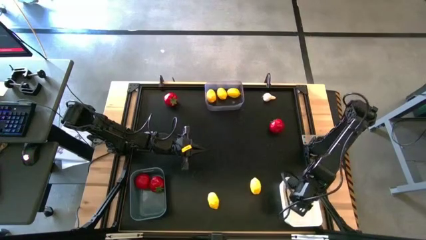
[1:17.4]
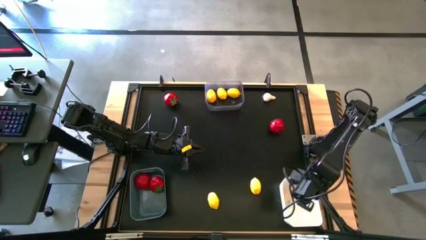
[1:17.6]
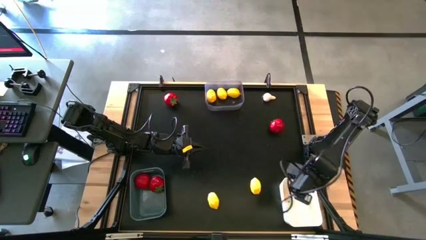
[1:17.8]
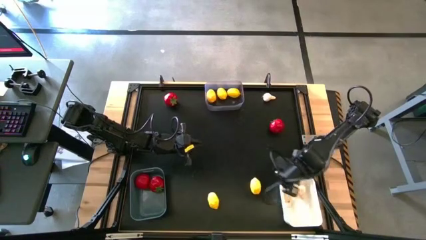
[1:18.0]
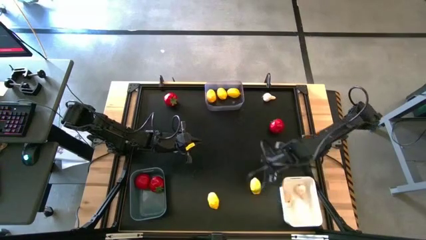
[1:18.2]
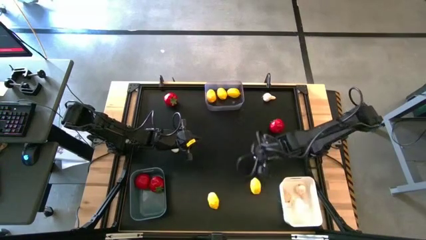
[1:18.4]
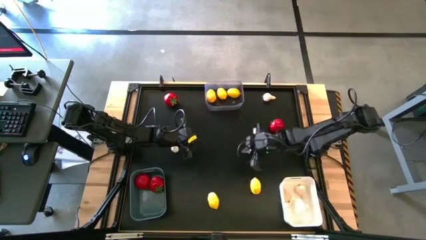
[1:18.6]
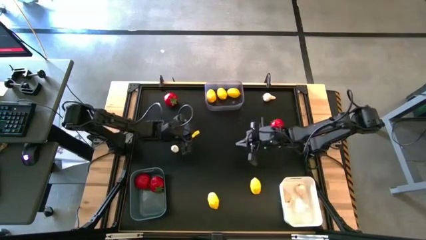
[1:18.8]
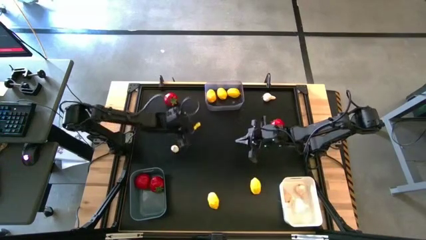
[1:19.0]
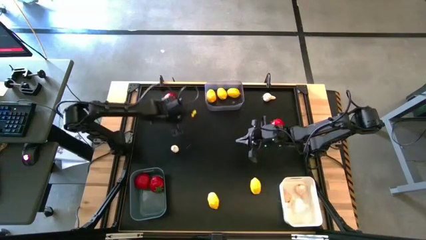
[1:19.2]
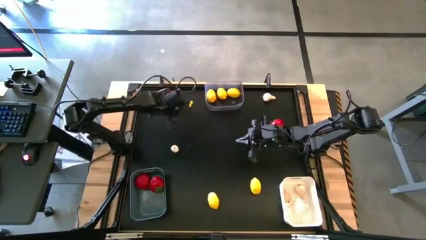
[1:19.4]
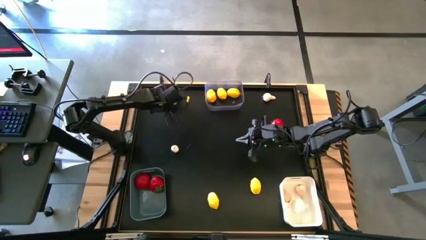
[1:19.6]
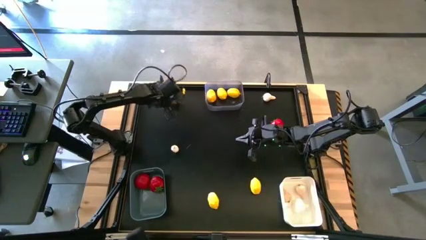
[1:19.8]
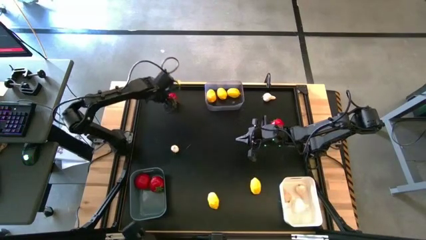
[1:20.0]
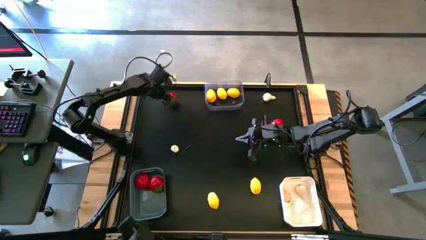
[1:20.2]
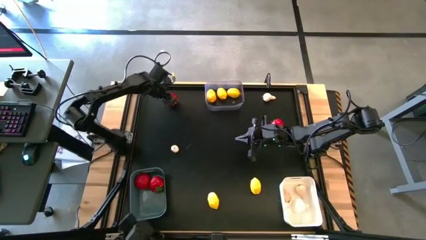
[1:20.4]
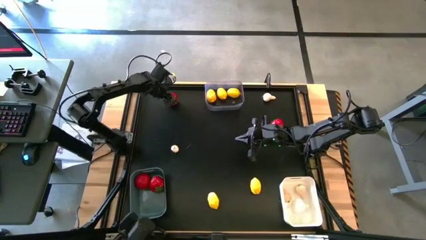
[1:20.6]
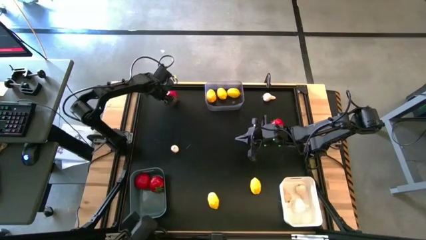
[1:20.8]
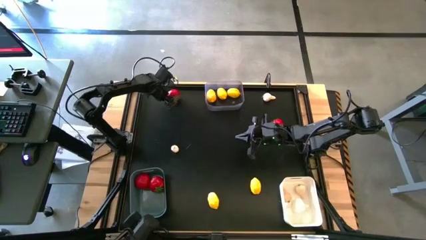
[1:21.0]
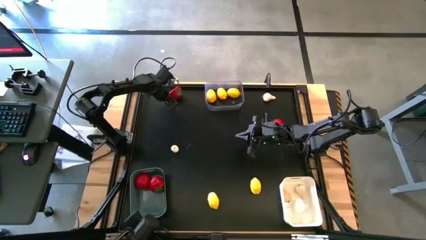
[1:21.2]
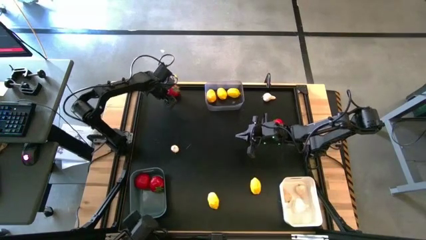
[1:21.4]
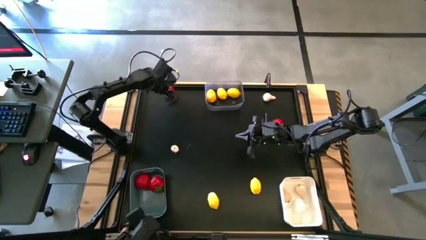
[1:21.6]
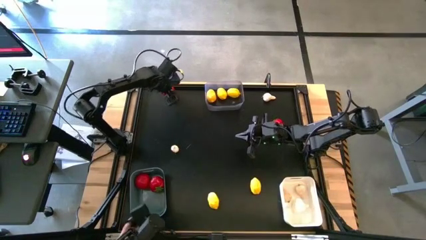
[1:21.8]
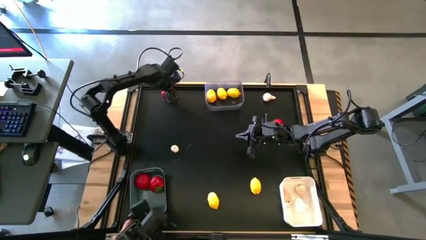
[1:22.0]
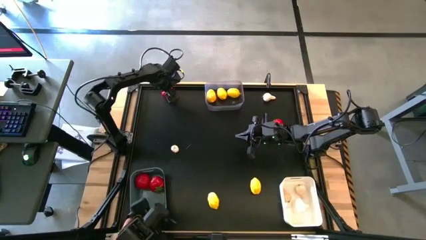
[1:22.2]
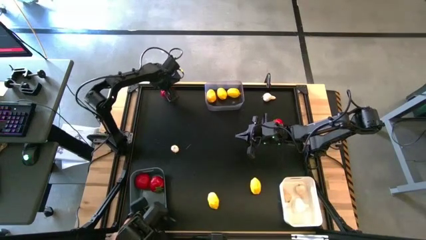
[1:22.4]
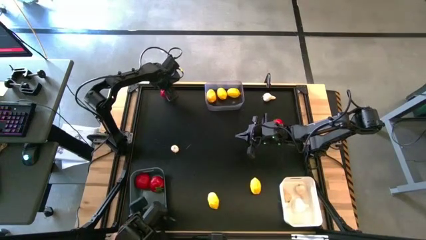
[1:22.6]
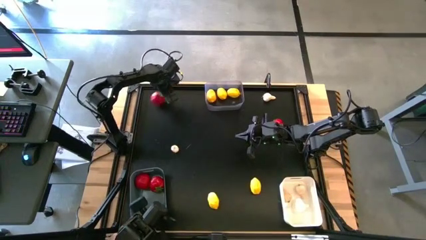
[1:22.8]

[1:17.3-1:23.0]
Task: Sort produce into baskets
Put the left tomato into the dark green bin

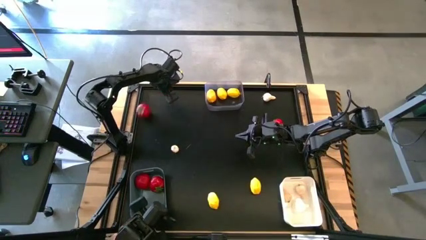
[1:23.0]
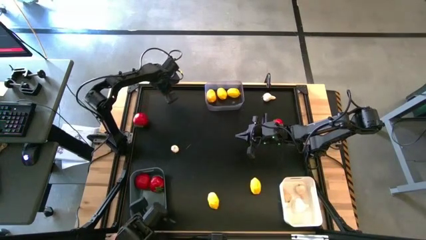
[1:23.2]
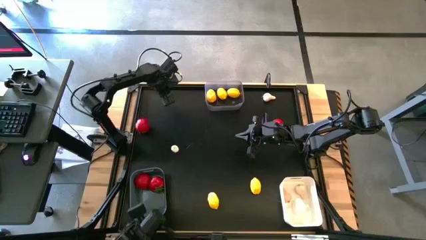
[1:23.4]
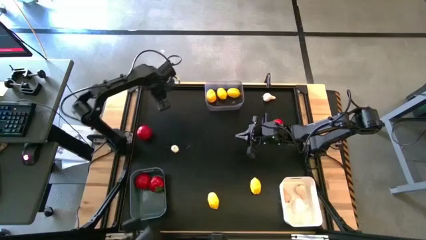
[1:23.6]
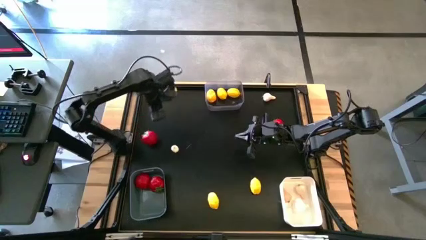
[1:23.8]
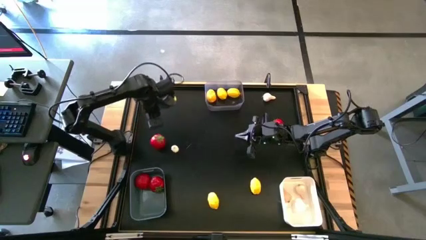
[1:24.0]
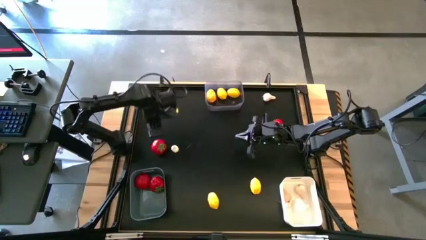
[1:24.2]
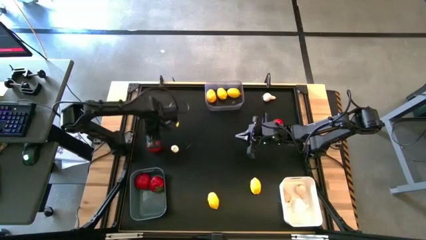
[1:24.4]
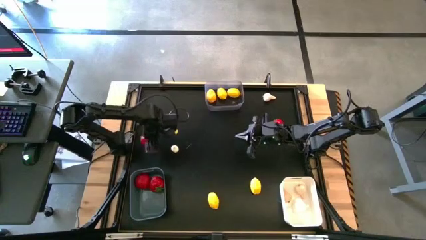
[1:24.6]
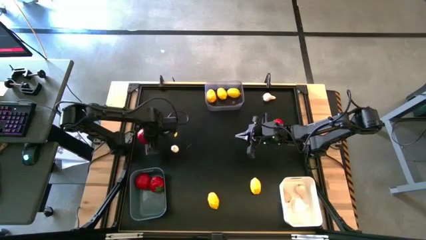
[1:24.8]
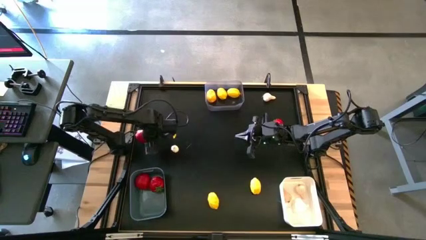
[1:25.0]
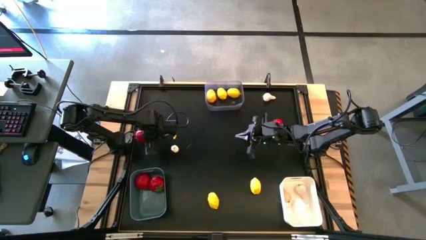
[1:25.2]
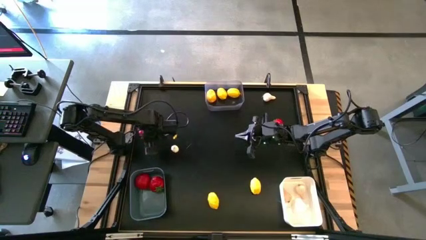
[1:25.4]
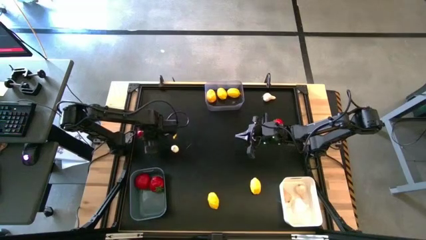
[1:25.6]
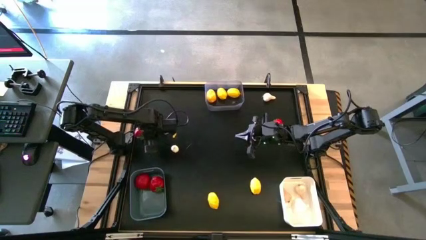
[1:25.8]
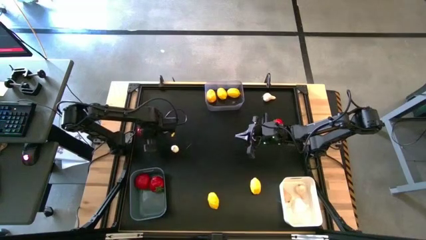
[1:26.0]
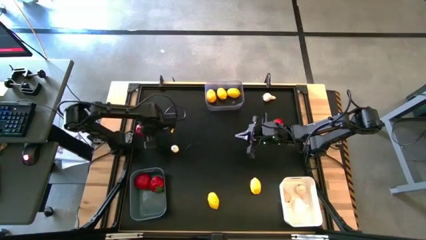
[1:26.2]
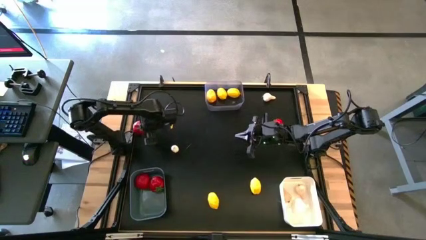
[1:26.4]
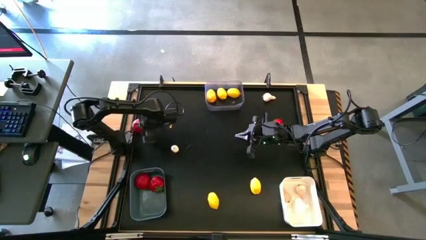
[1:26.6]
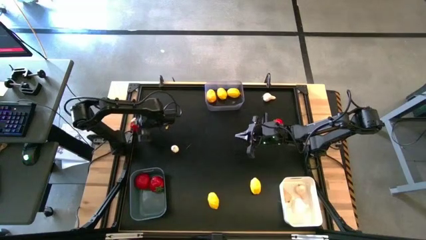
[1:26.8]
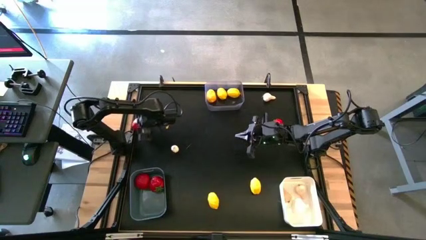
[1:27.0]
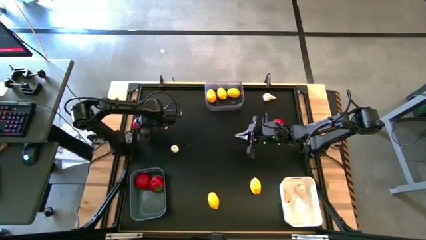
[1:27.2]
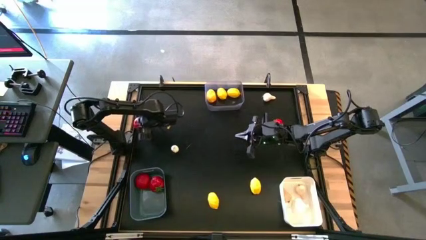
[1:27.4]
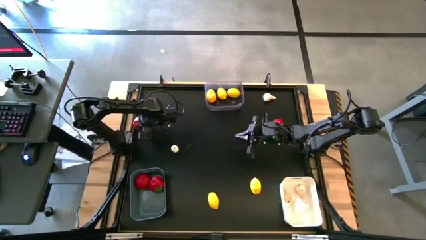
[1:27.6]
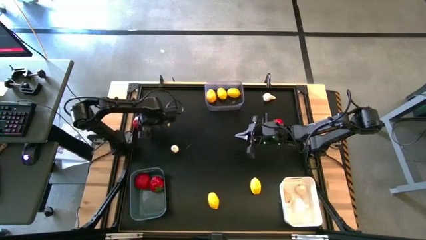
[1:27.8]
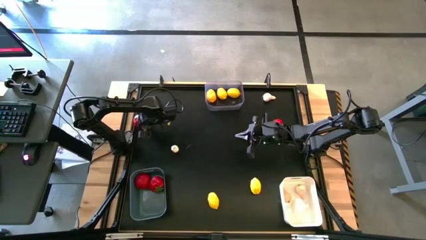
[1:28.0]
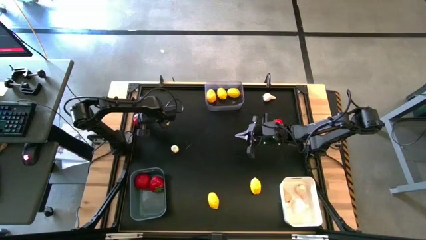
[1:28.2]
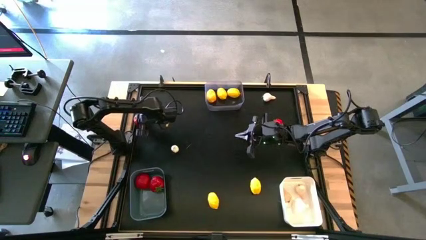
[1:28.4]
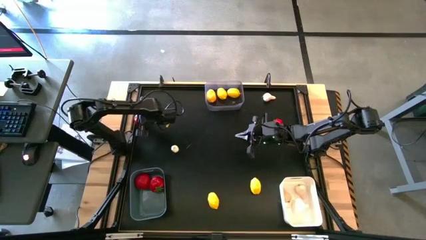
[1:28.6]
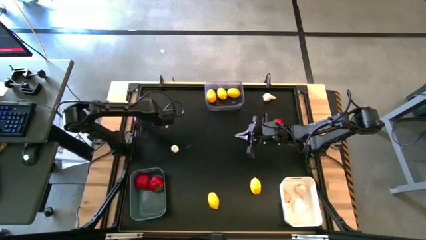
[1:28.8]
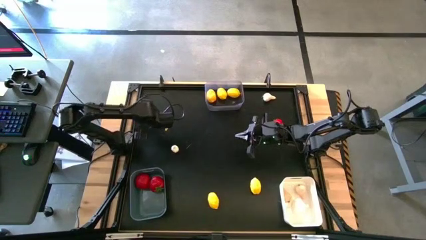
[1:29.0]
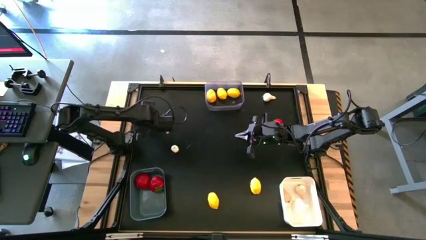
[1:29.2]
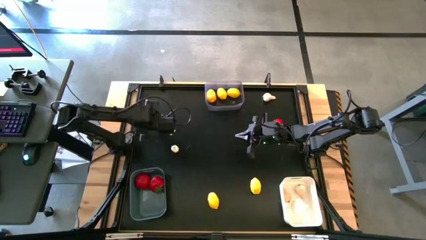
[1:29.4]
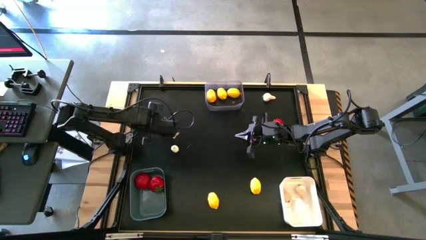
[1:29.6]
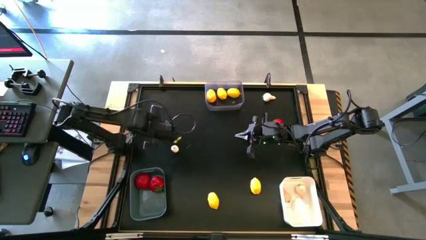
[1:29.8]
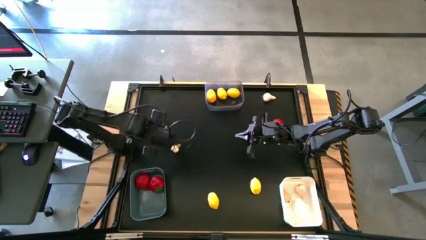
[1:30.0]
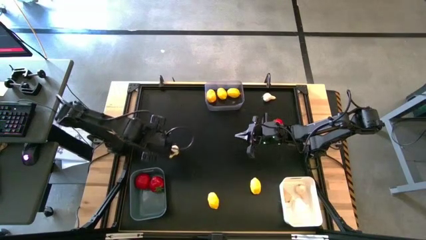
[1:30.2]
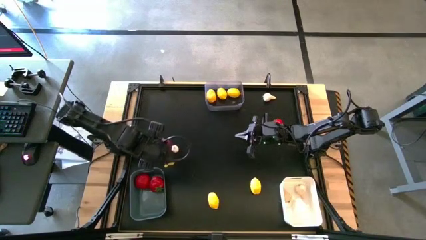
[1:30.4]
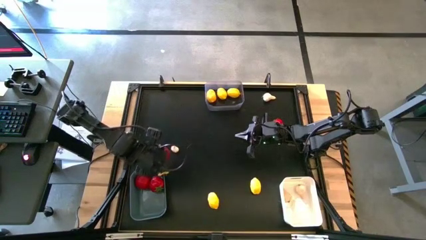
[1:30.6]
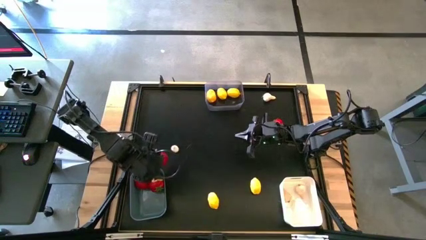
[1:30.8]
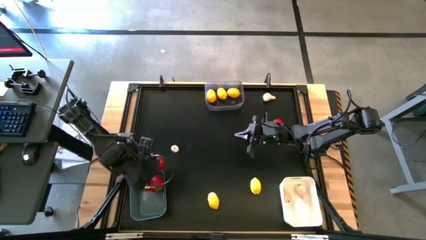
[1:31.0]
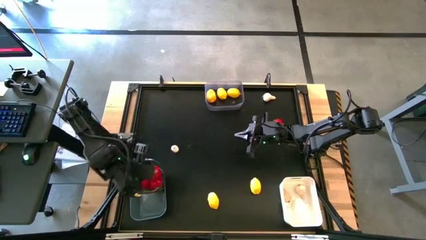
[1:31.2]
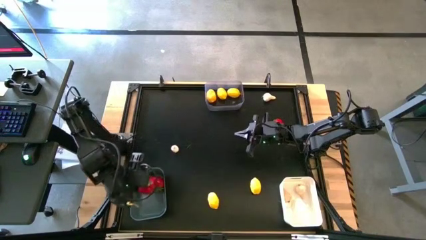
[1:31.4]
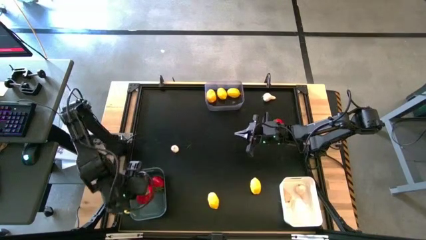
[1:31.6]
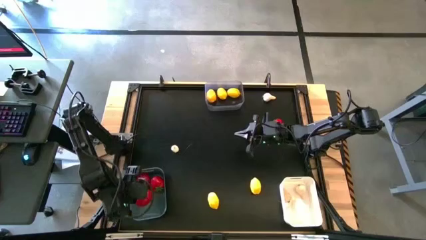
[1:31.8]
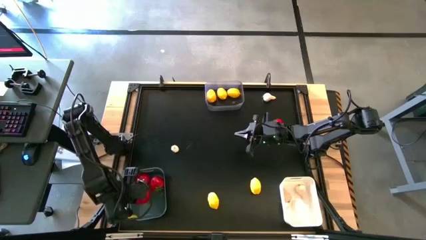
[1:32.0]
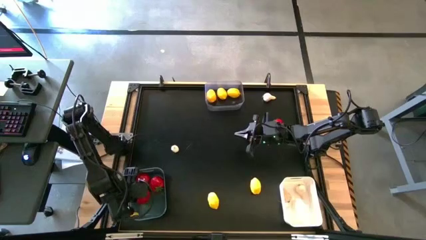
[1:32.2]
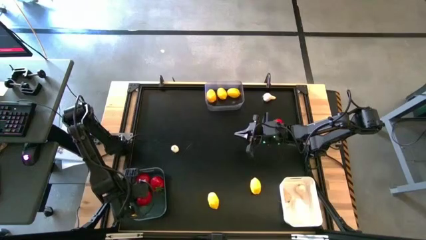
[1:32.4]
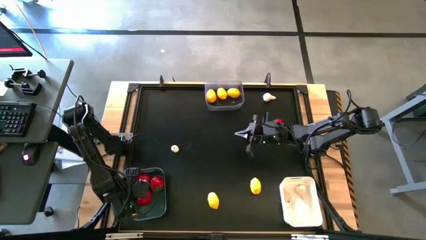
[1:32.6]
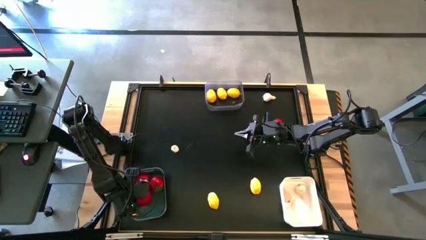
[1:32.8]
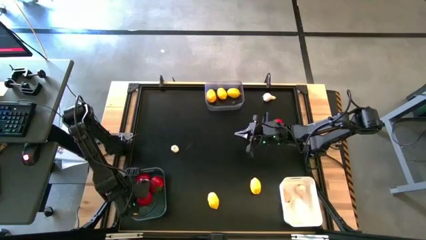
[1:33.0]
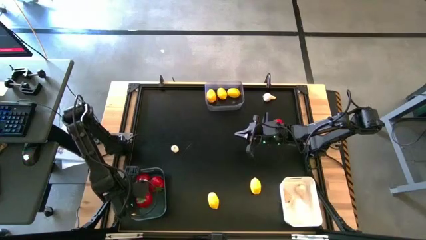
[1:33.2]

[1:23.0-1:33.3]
Put the left tomato into the dark green bin

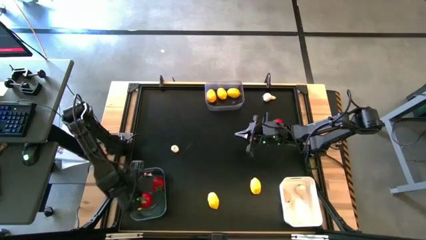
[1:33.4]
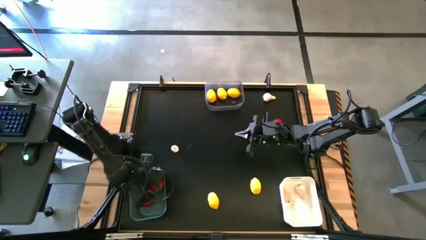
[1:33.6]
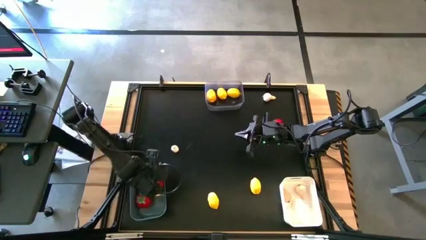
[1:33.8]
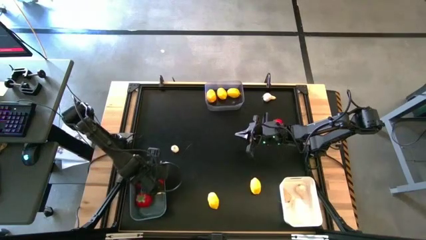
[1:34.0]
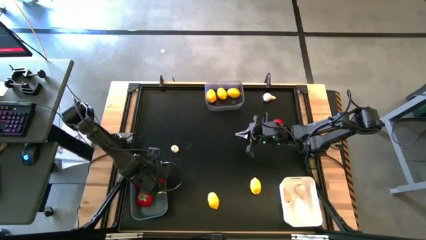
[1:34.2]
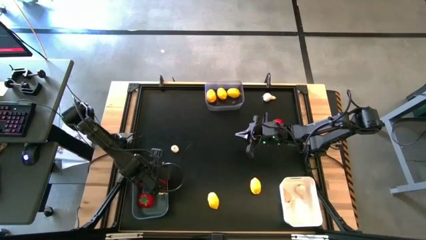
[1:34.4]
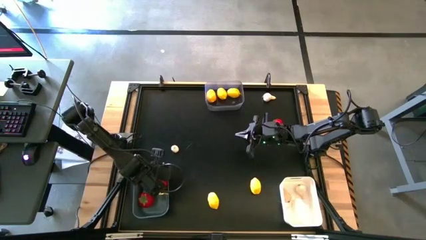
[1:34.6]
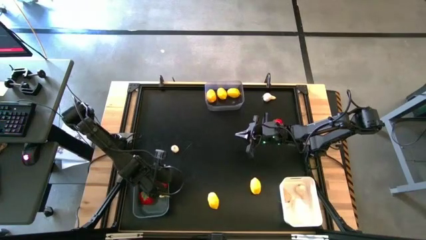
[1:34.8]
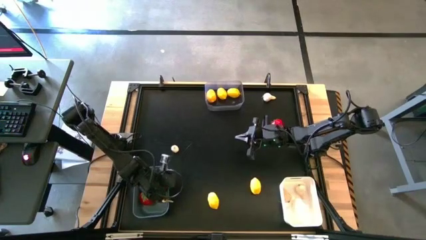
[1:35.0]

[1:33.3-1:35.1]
Adjust the dark green bin
